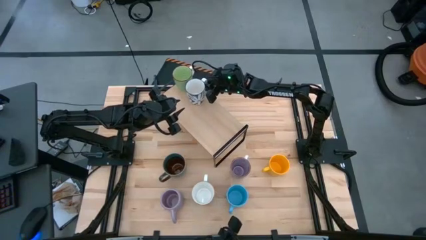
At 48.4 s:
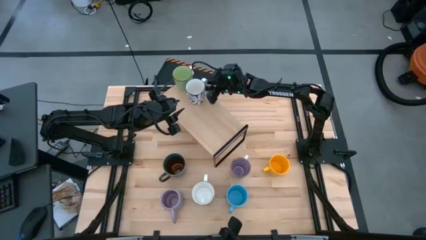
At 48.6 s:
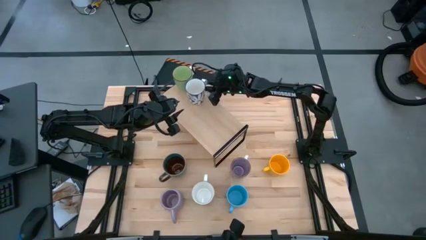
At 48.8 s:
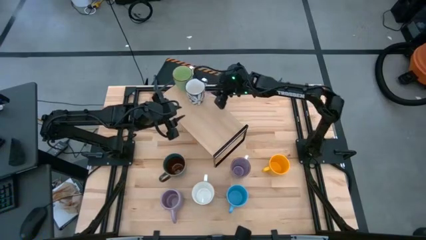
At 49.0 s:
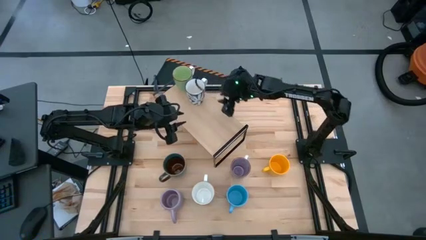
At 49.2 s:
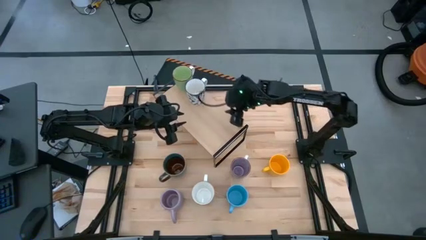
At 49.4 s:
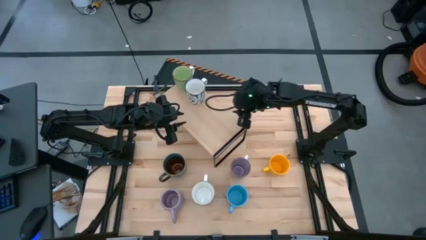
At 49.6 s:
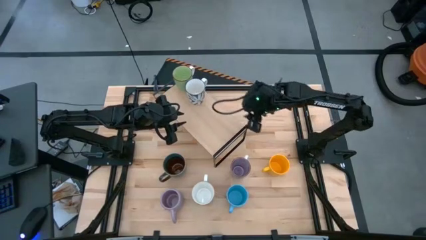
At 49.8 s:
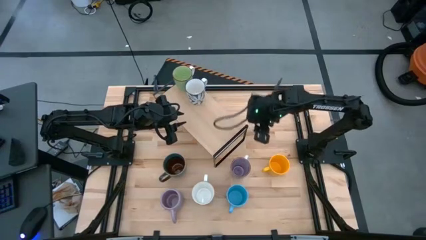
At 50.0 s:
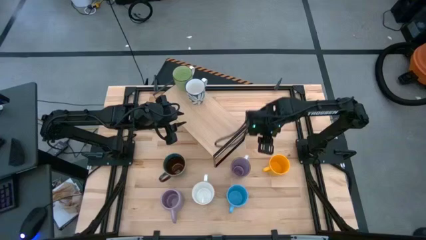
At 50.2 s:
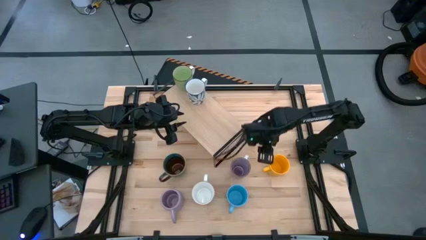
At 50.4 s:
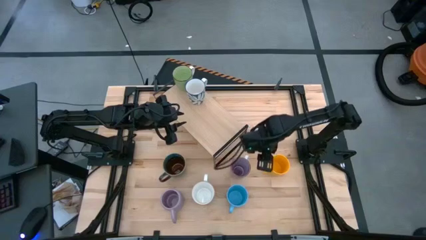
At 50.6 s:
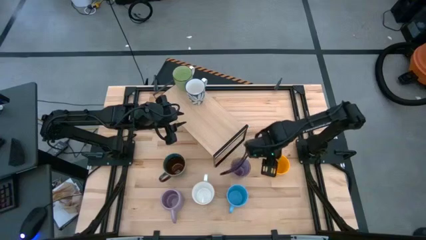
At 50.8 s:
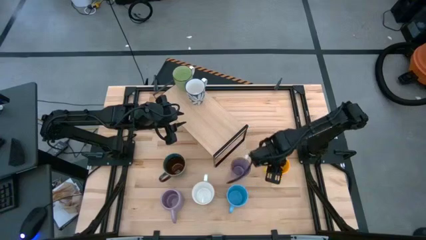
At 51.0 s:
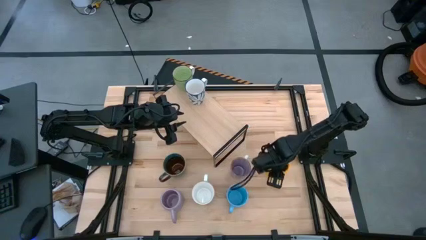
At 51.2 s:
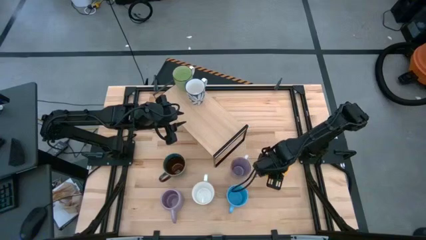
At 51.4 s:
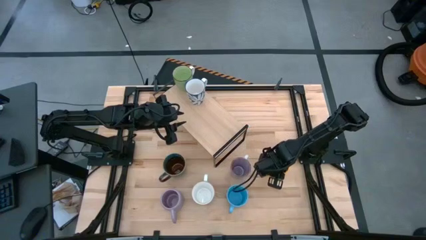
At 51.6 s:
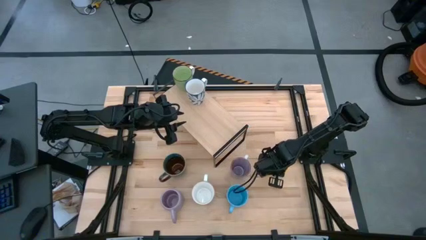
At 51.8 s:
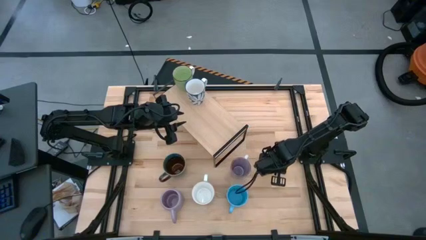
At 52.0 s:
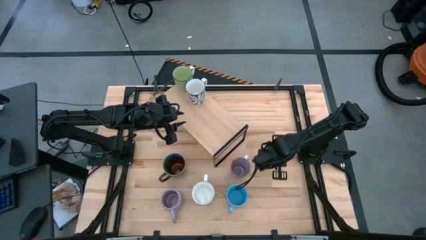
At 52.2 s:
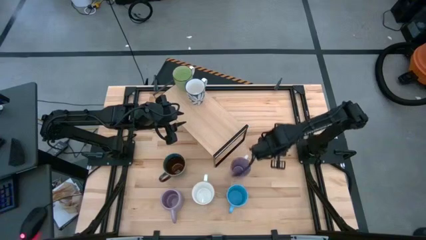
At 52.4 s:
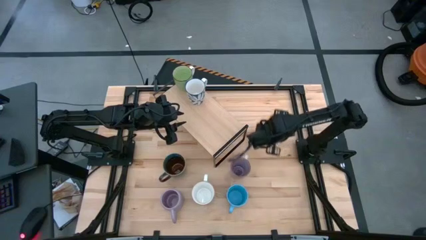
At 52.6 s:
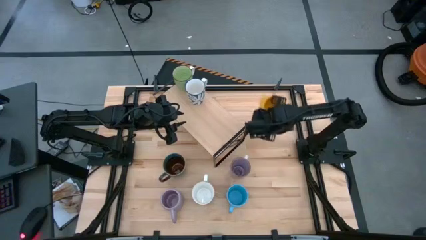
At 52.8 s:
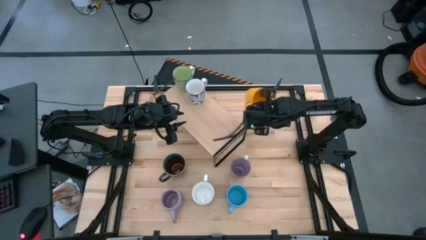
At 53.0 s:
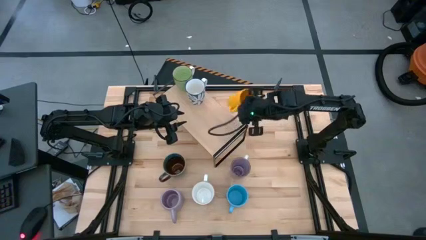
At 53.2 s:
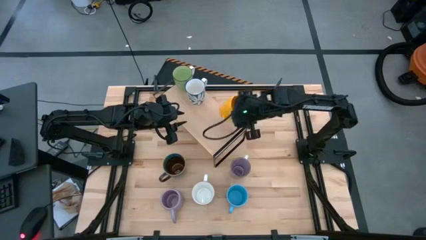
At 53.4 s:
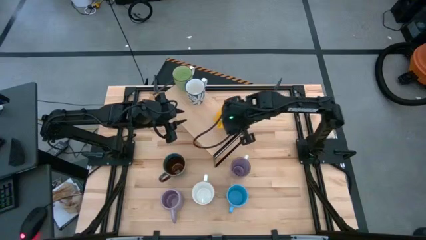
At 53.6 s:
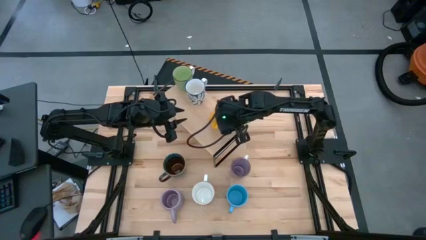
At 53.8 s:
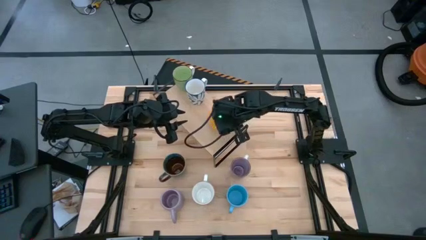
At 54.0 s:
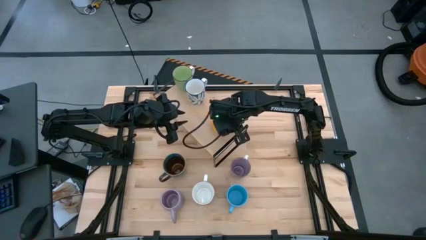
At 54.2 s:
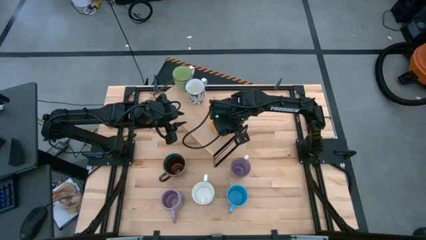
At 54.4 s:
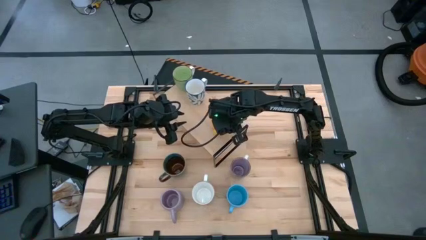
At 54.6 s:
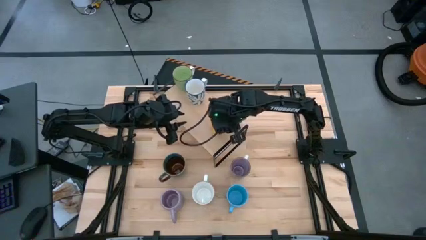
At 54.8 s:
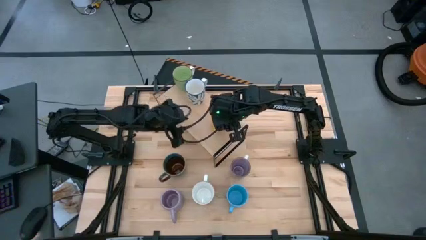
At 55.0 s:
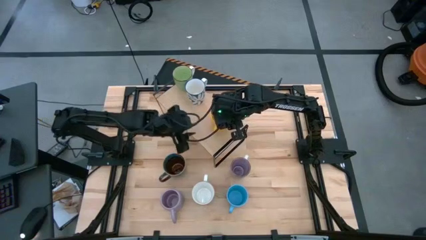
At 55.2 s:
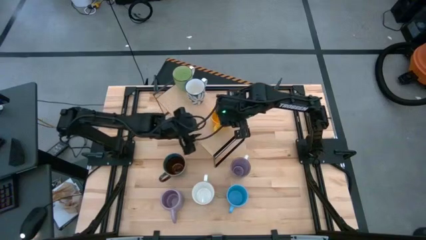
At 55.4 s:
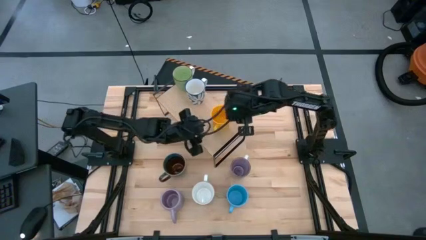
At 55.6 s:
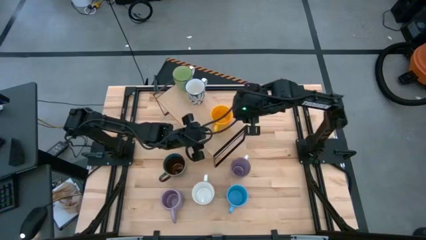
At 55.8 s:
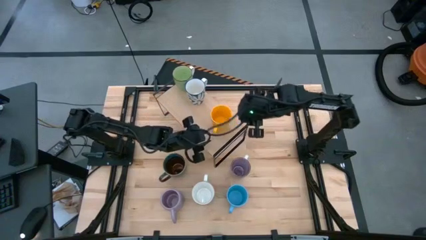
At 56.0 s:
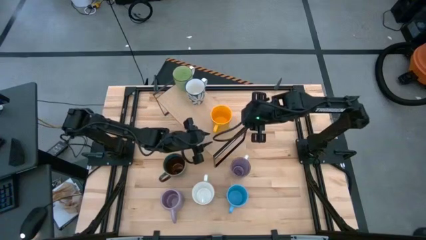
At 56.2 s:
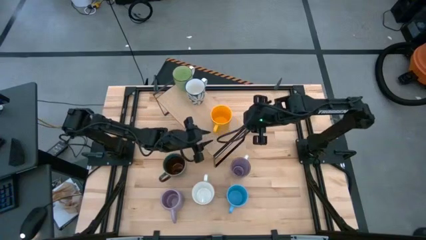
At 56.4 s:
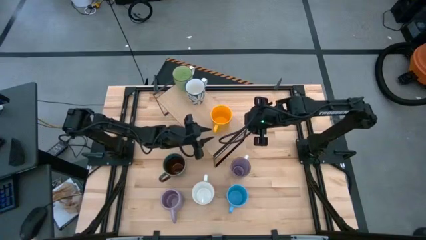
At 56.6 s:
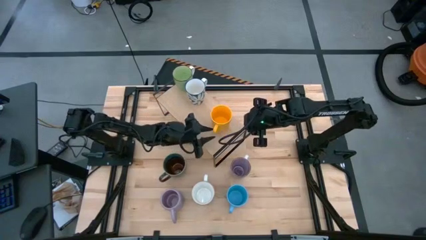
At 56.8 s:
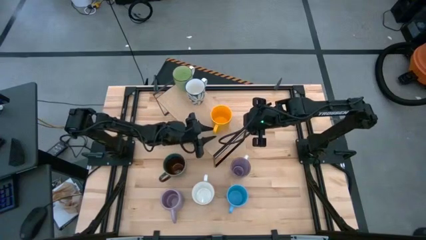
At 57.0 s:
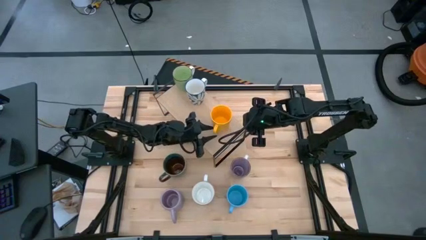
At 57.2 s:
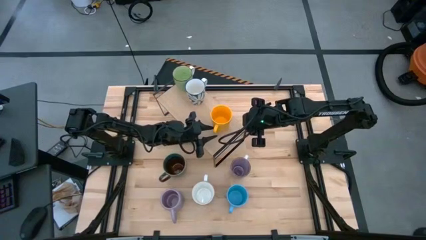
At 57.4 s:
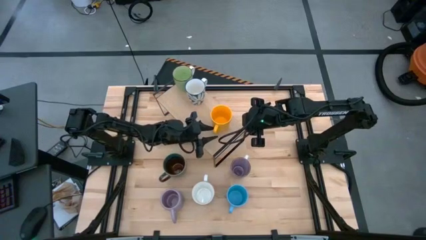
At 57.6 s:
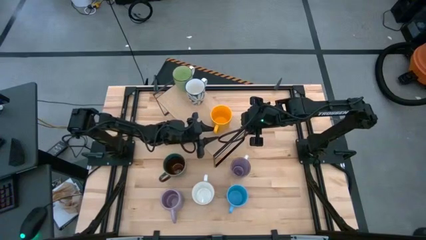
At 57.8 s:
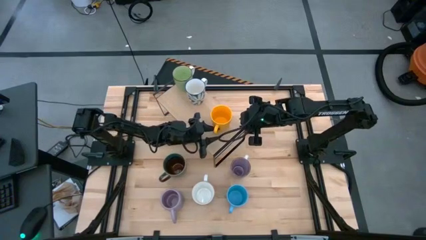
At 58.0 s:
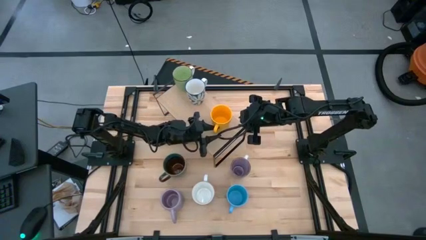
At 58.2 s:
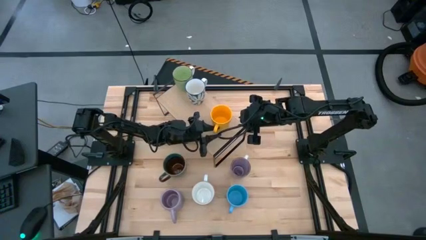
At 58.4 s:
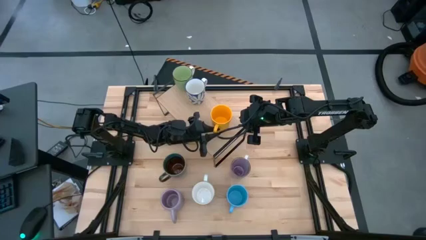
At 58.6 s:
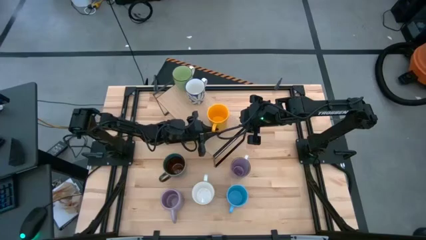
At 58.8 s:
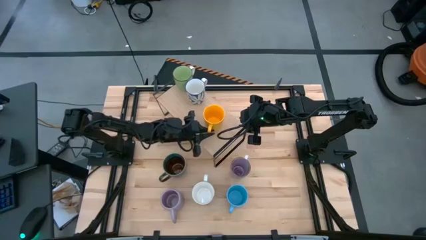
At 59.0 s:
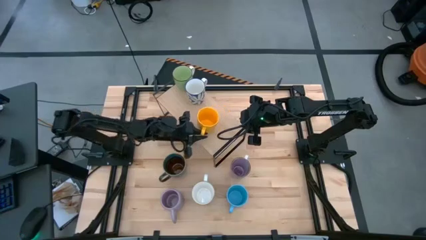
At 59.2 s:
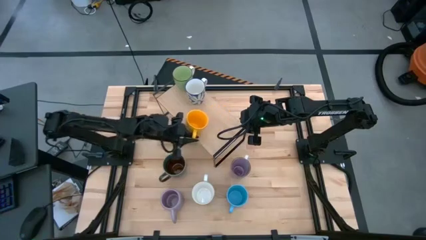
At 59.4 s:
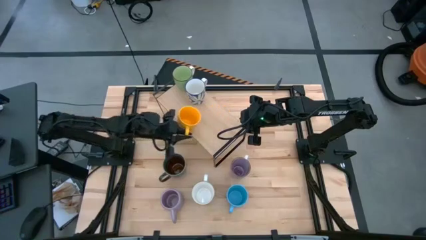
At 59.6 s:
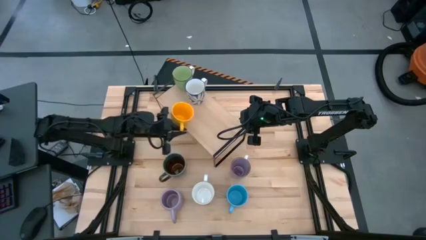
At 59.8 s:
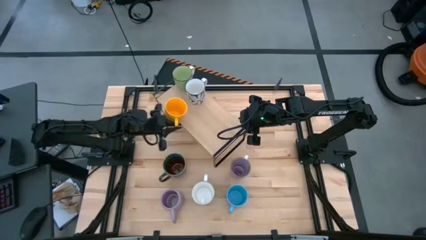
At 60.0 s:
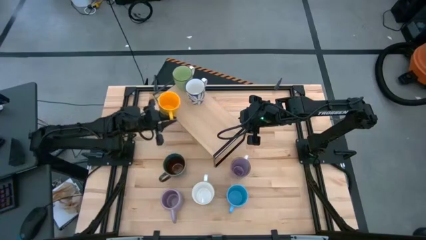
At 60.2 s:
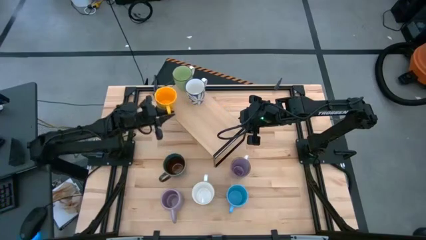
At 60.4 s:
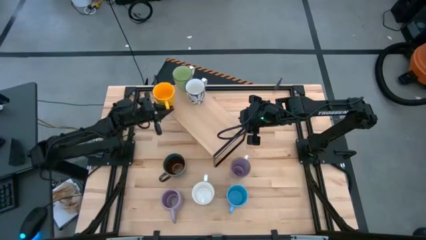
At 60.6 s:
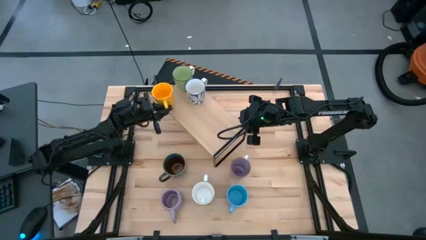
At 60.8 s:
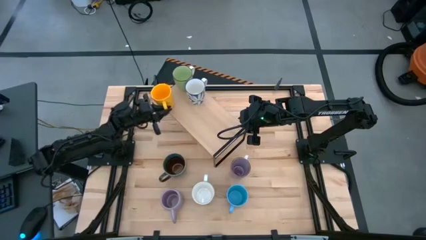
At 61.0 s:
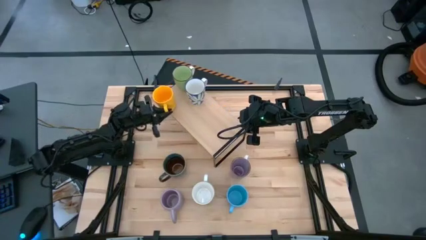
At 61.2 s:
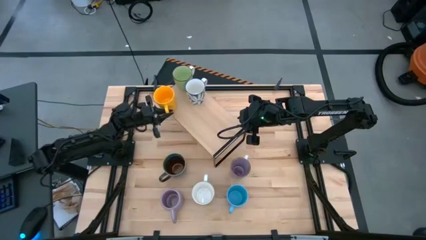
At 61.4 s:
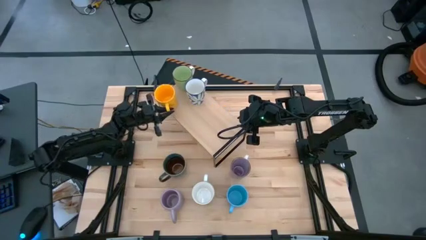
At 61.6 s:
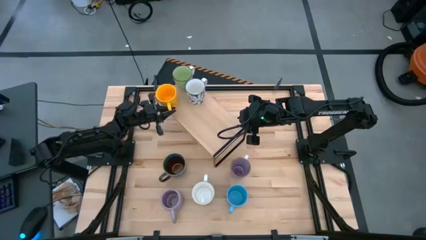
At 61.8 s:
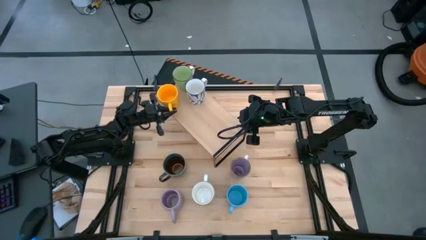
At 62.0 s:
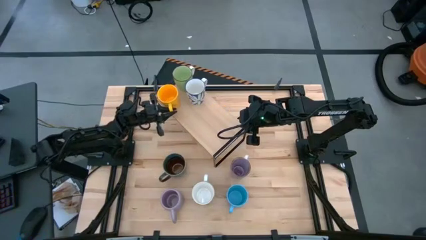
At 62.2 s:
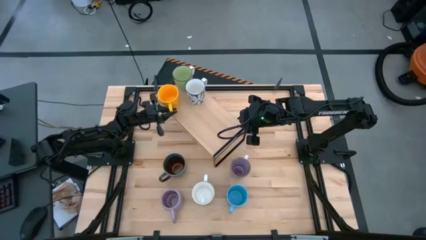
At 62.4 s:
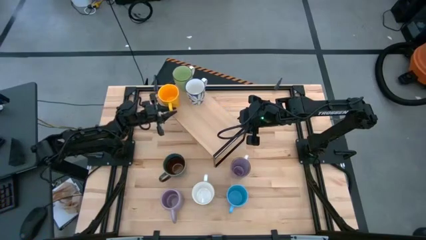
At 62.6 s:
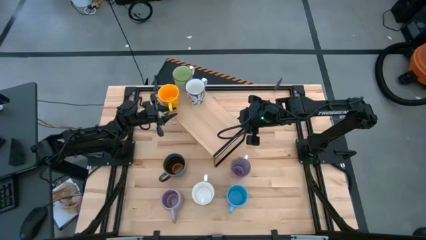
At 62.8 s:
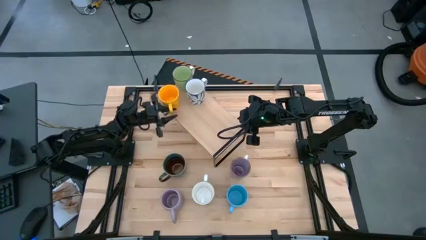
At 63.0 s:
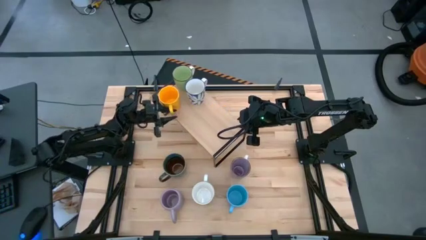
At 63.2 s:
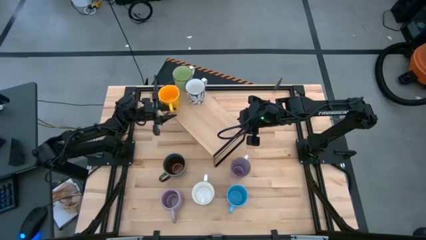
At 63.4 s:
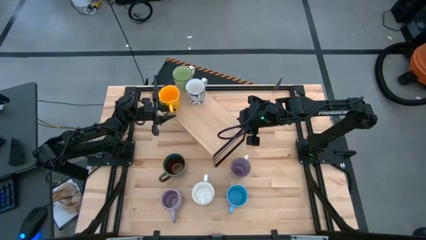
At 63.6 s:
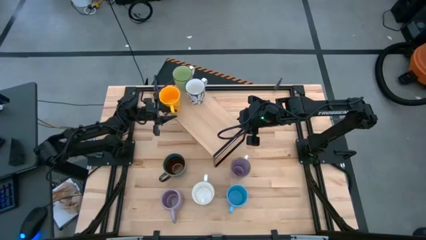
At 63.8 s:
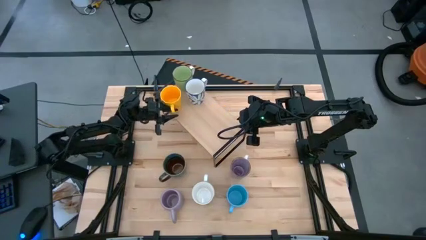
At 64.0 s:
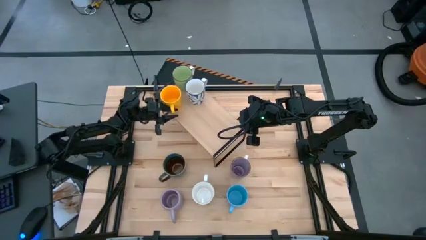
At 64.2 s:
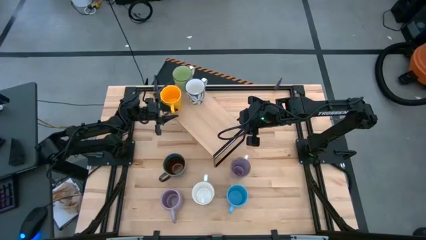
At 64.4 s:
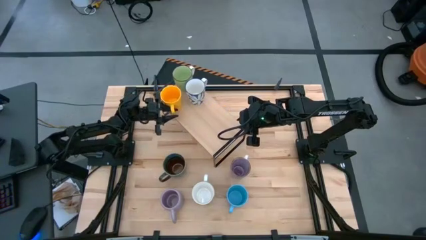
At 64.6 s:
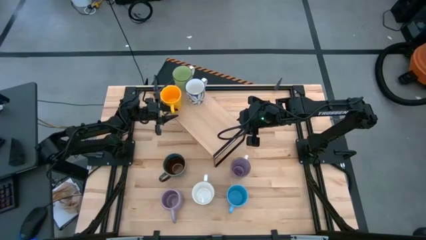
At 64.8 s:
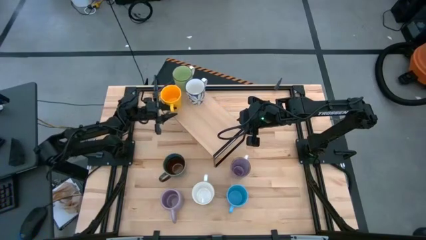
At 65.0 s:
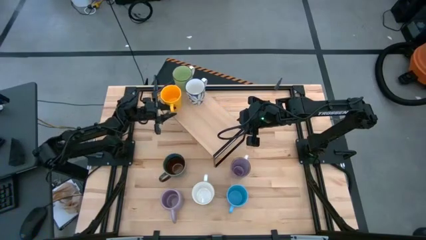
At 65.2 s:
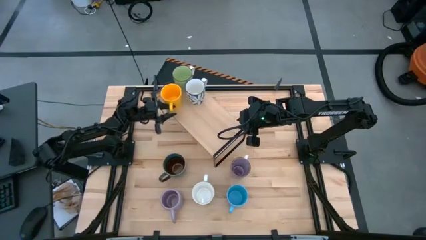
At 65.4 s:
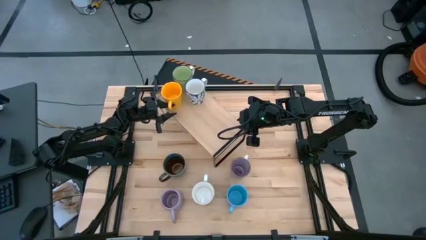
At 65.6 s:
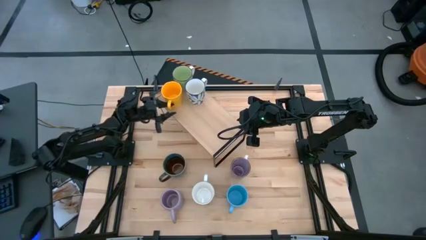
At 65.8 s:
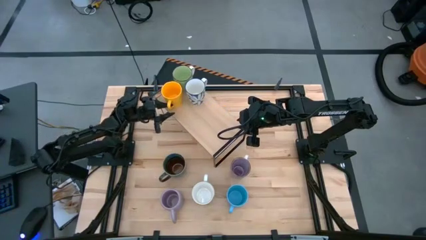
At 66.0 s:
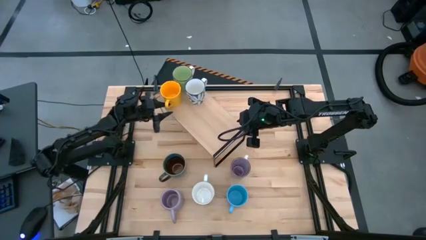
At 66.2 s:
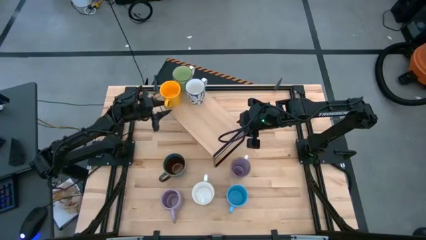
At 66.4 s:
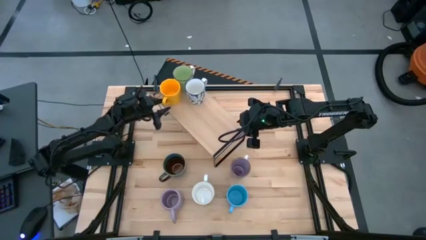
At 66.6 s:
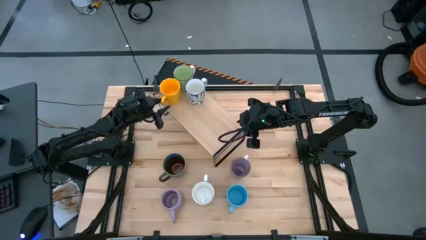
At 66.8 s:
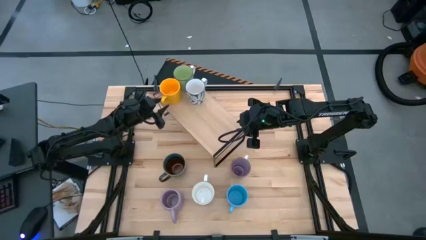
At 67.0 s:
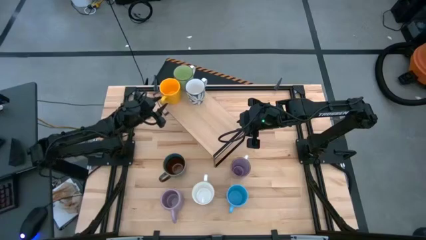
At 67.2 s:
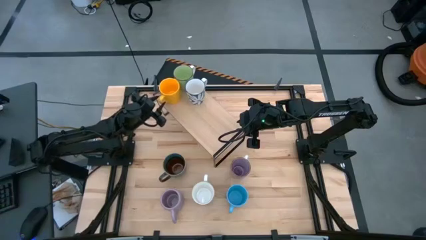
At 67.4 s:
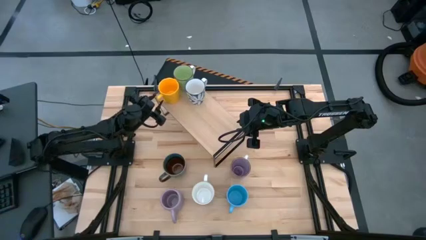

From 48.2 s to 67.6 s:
Task: Place coffee mugs
Put the yellow mug on the shelf
